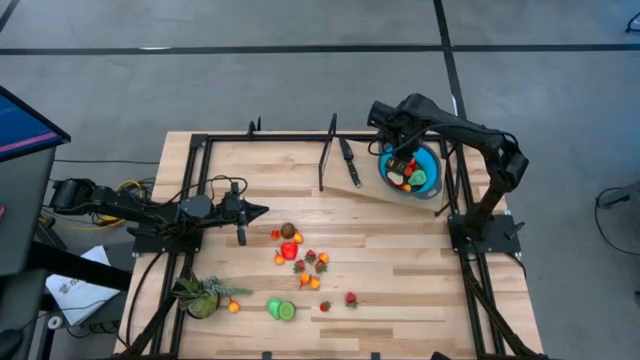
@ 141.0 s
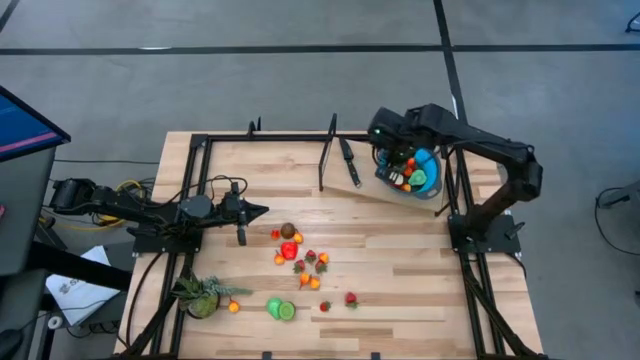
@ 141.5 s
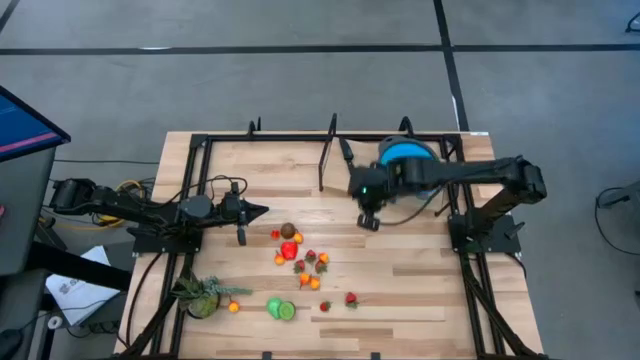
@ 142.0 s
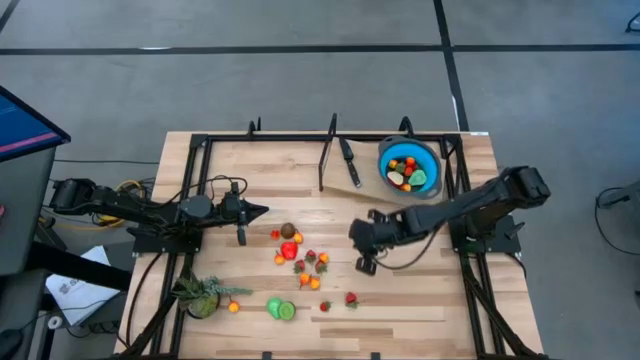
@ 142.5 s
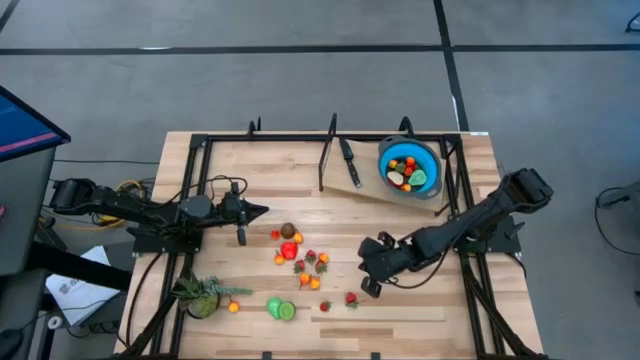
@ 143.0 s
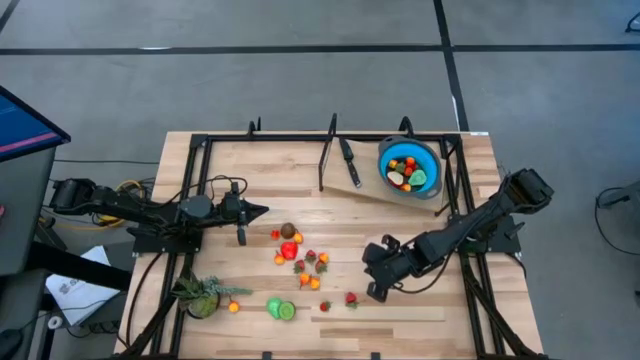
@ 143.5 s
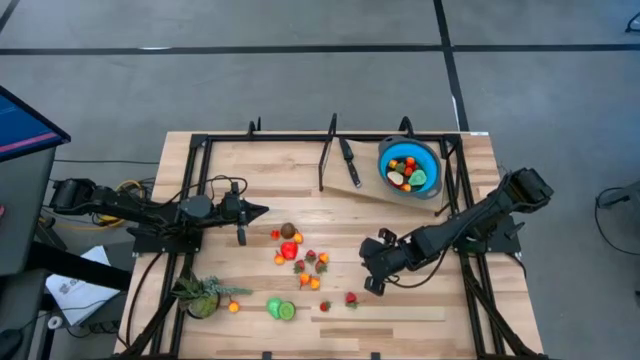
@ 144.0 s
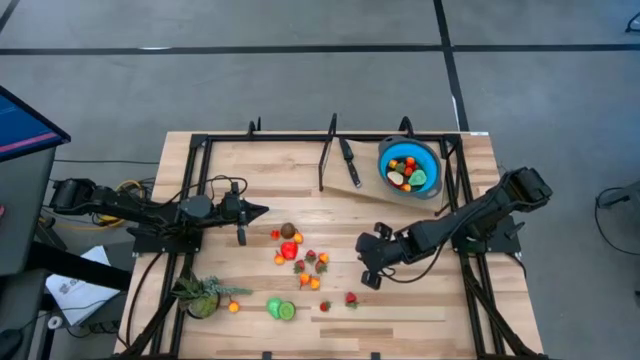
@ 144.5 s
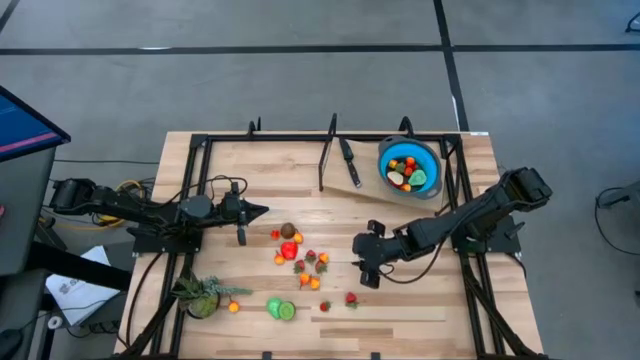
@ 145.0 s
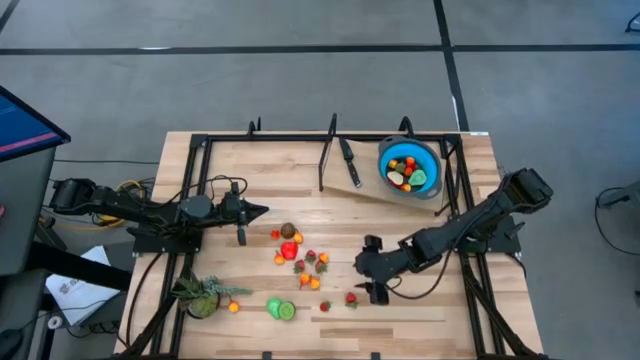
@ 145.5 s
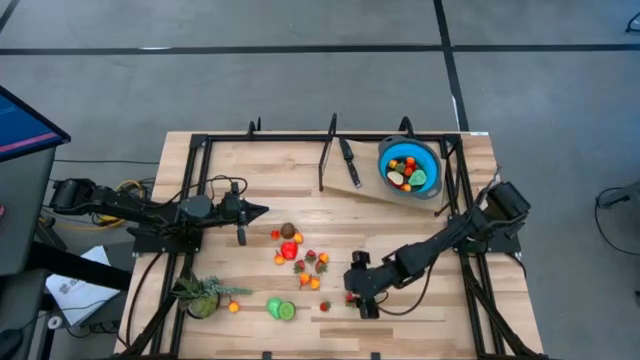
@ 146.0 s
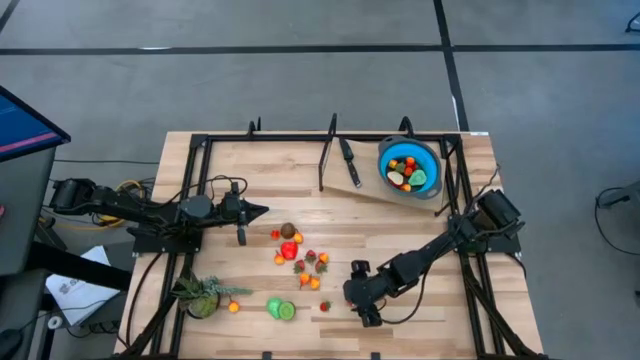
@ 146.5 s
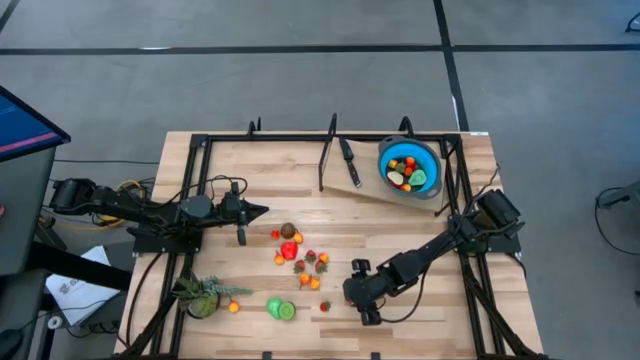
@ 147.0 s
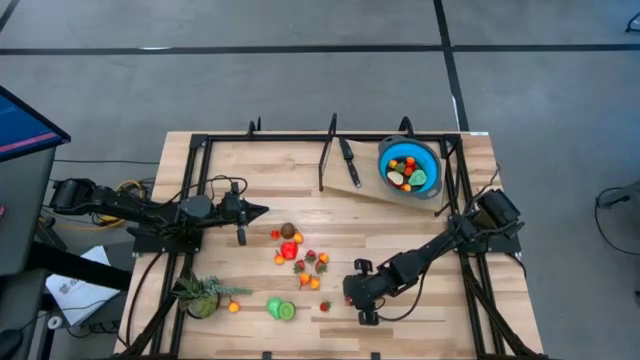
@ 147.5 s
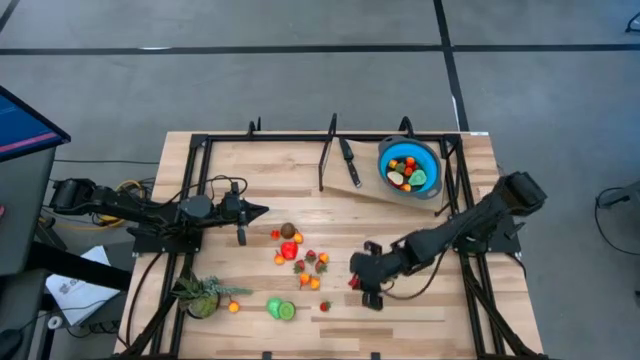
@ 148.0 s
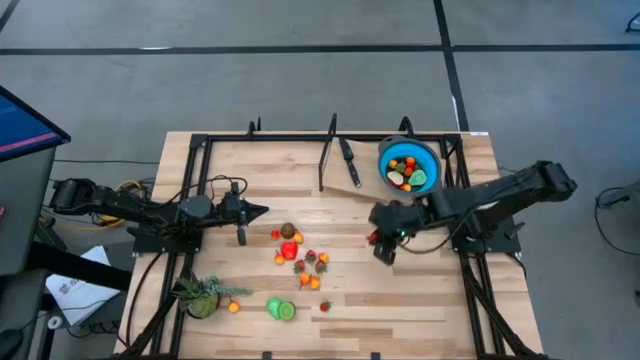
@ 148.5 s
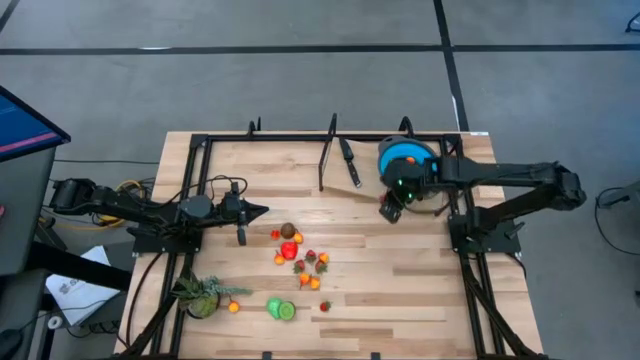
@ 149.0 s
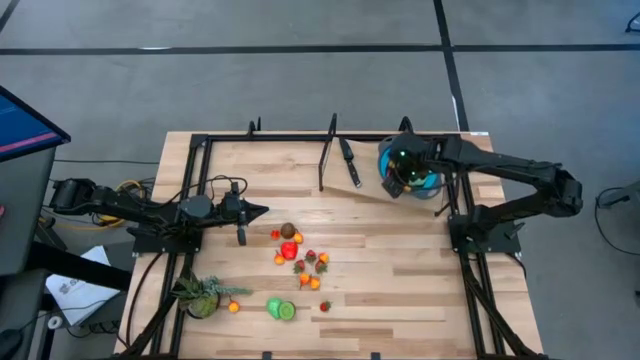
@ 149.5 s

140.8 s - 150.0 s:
Task: Pick & Place Fruit
Put the red strawberry into the blue colander

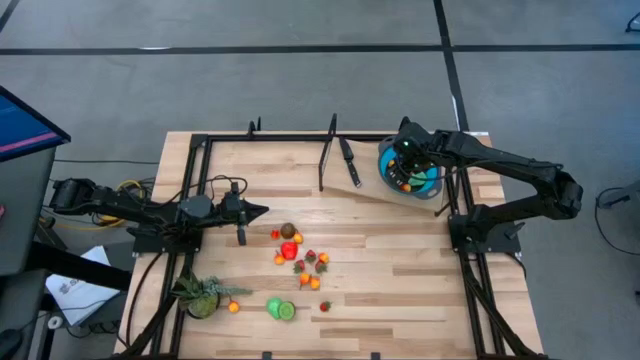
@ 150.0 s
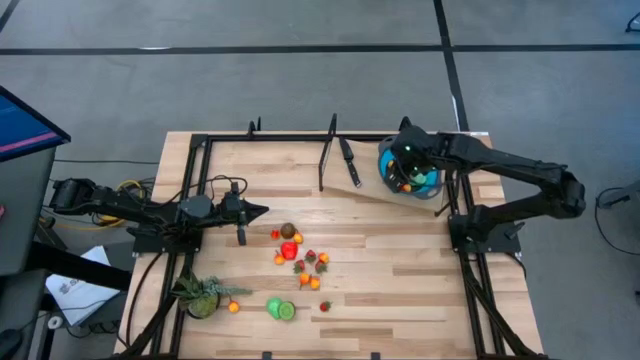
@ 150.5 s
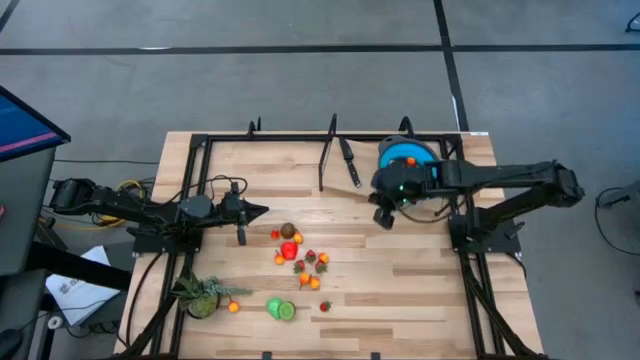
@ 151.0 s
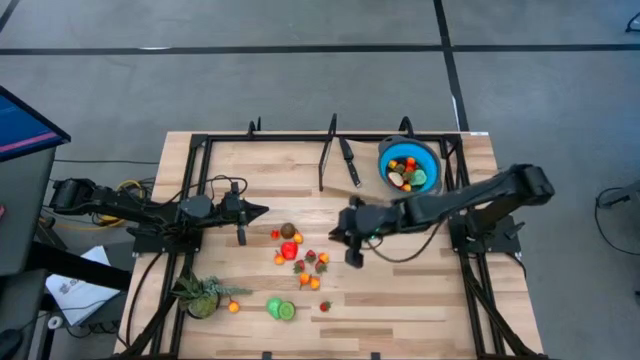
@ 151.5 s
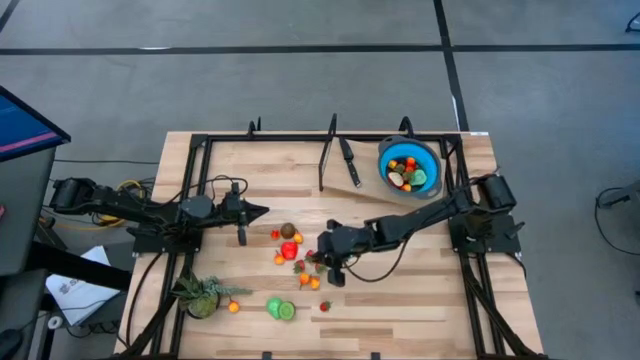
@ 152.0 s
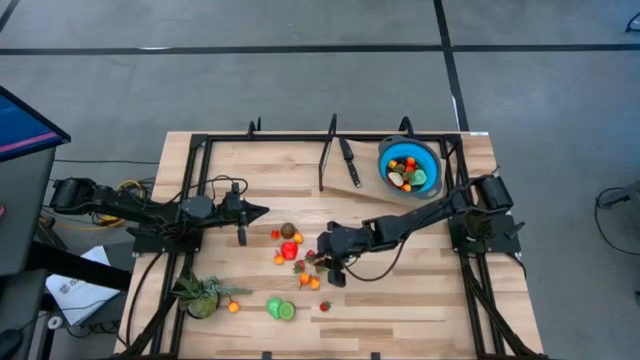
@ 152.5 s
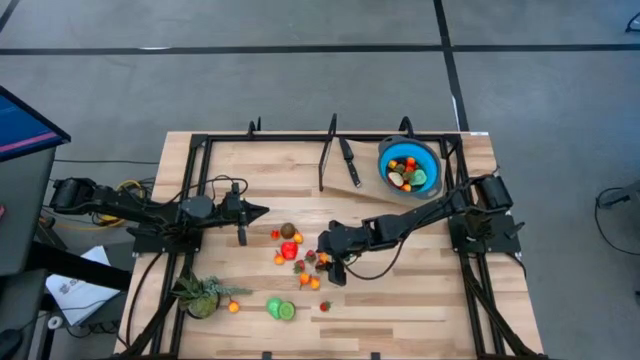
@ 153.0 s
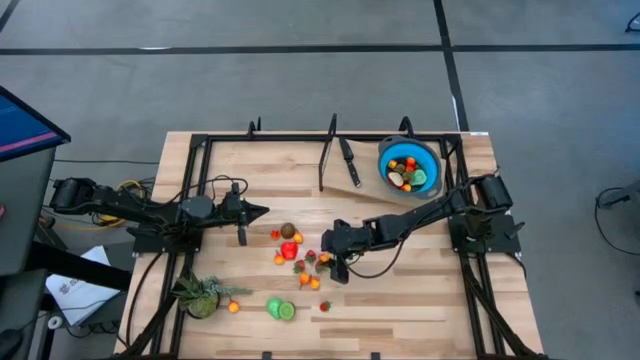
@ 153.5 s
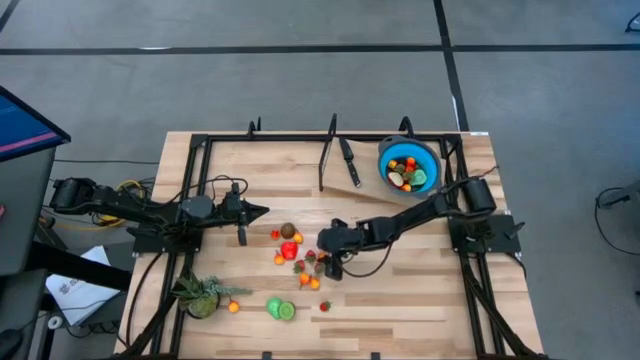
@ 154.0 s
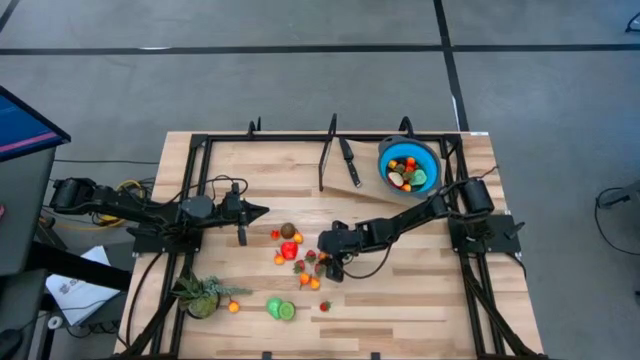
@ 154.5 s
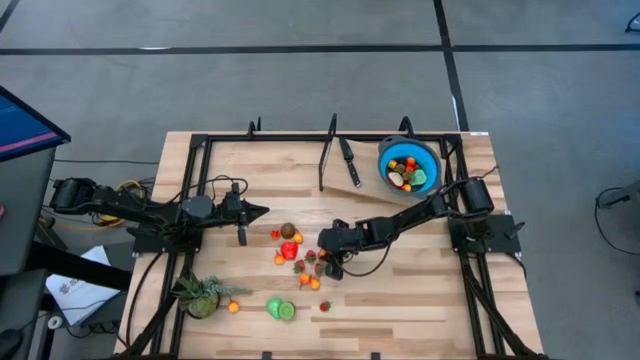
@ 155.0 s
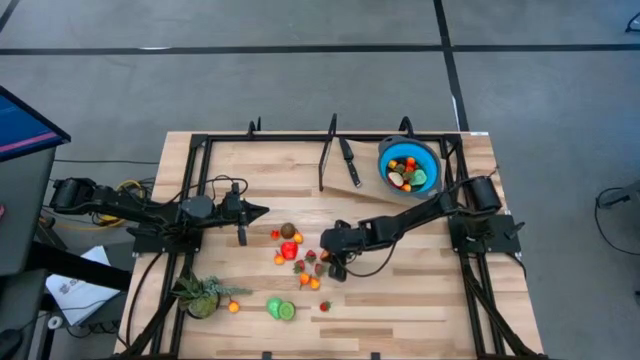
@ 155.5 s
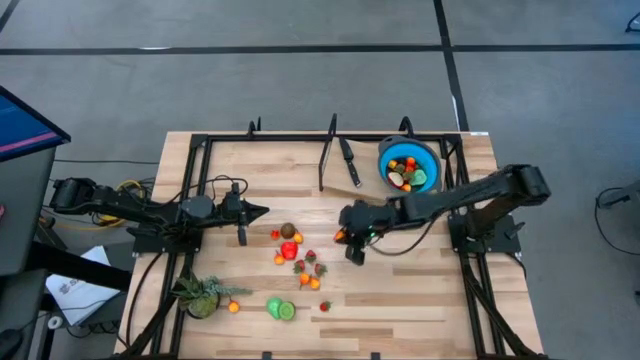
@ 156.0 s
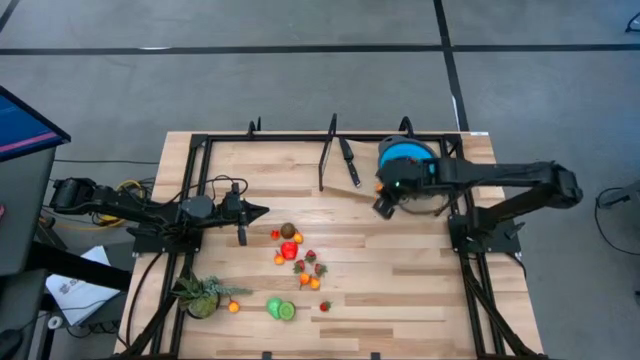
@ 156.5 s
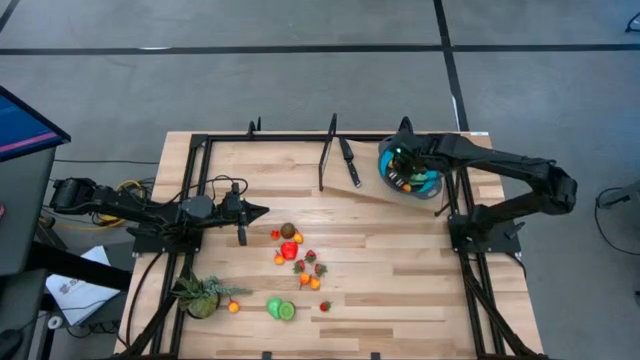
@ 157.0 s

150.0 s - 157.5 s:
Put the orange pear into the blue colander

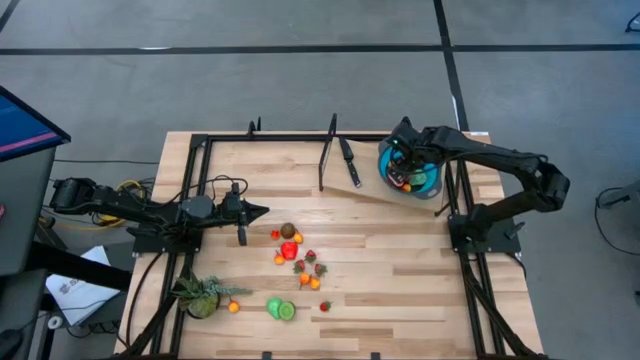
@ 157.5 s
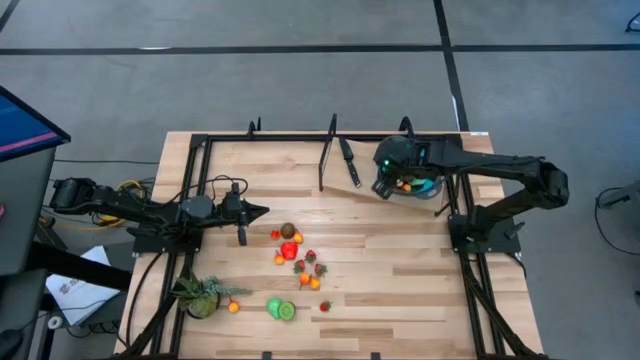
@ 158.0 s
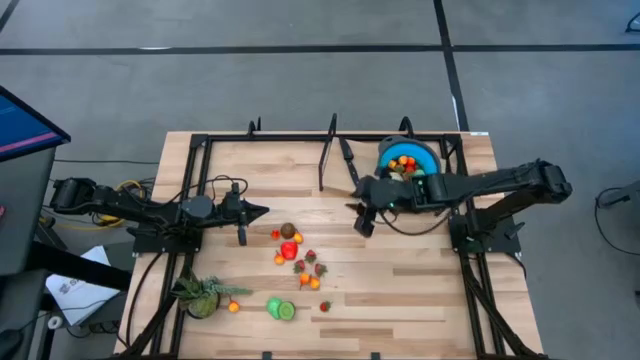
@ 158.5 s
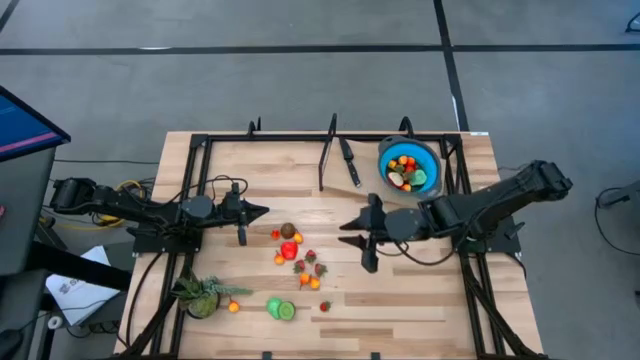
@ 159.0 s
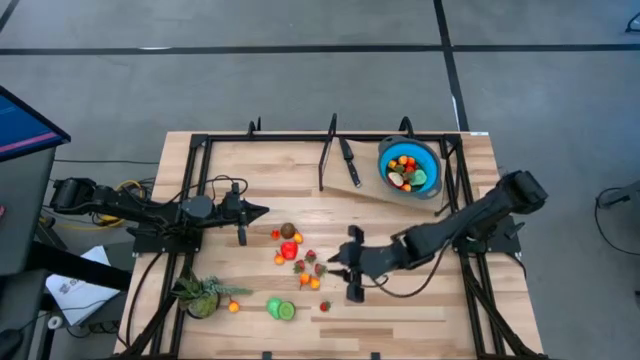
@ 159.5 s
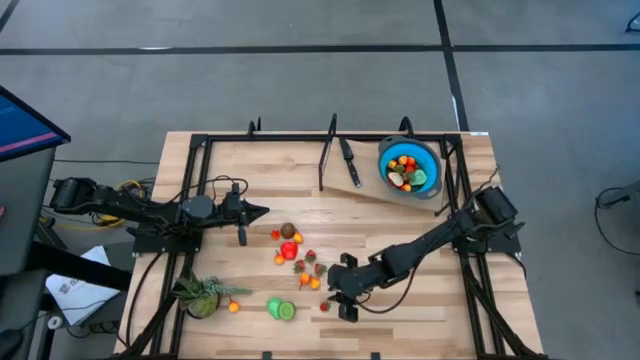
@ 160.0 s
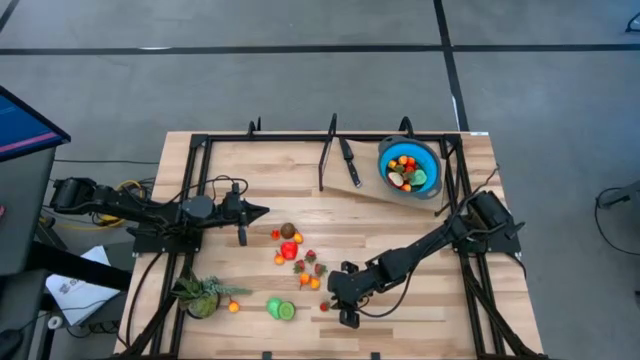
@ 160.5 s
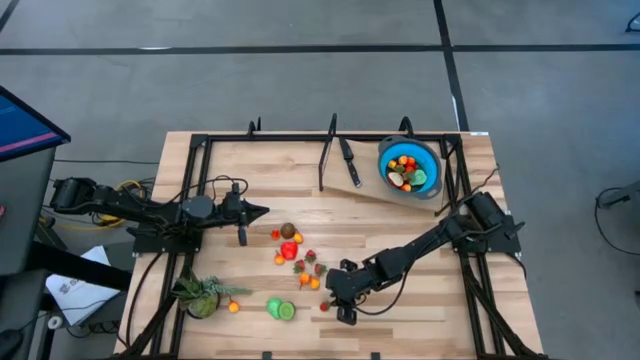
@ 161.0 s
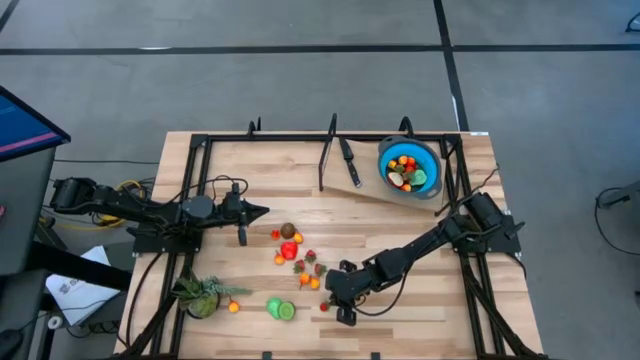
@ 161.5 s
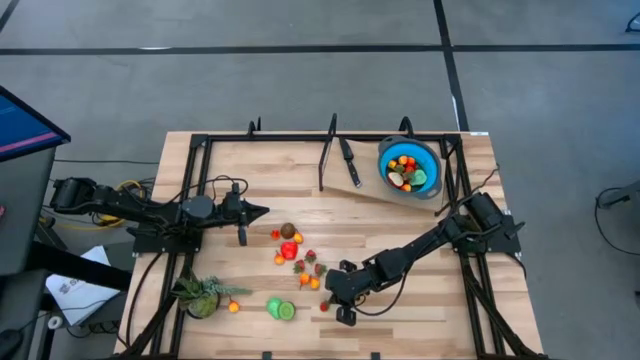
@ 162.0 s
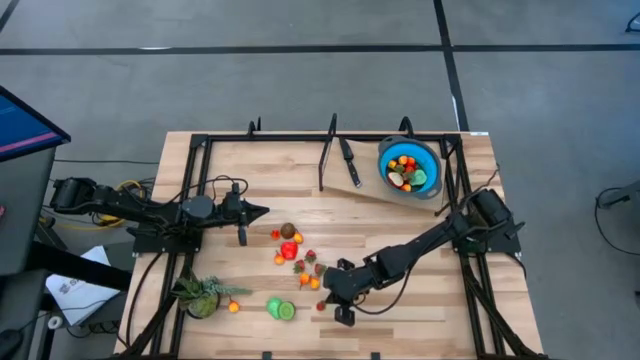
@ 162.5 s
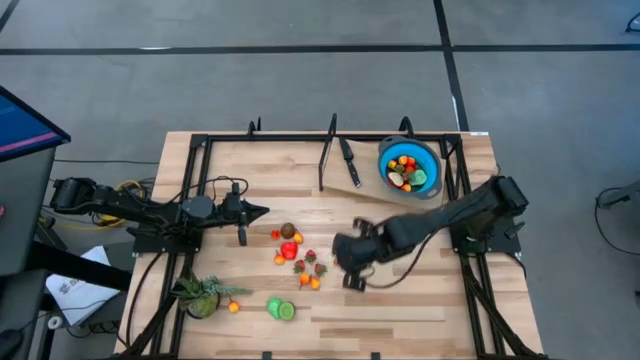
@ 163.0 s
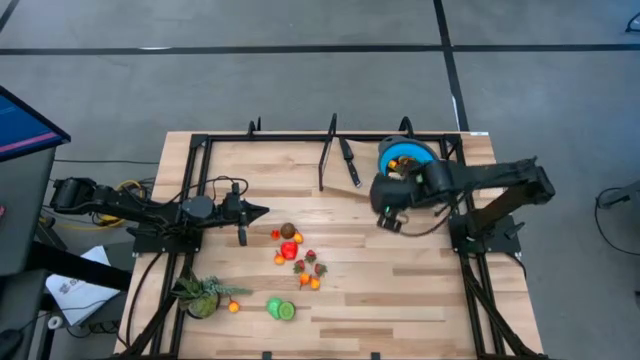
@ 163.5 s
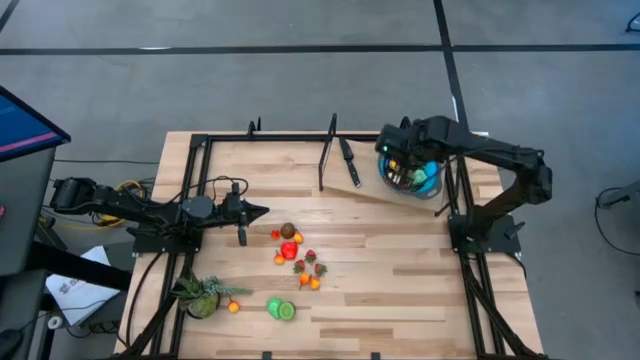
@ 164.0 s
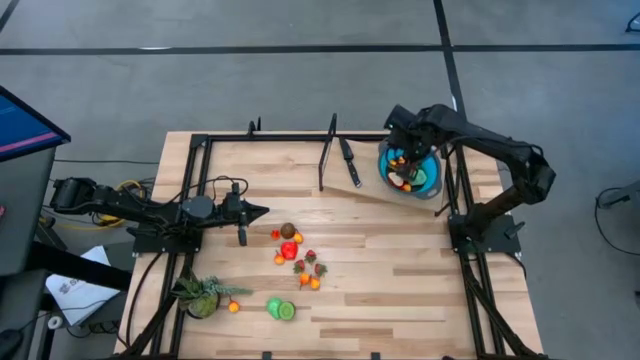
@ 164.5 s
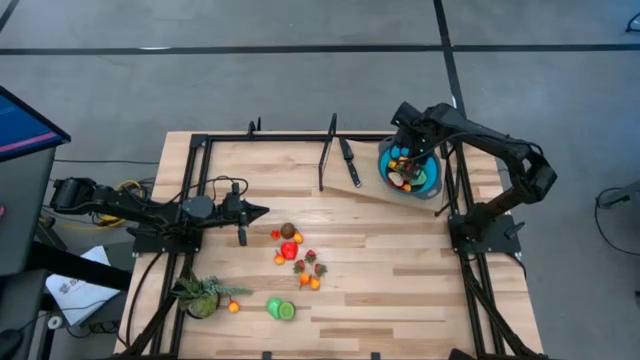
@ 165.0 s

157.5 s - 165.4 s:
Put the red strawberry into the blue colander
